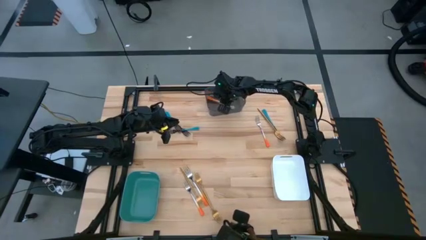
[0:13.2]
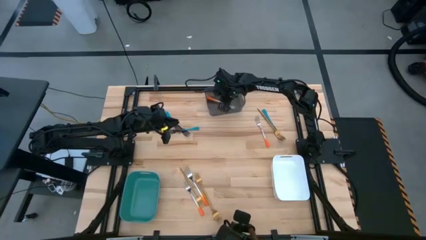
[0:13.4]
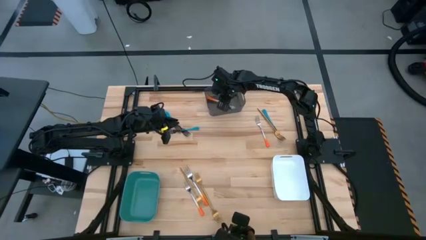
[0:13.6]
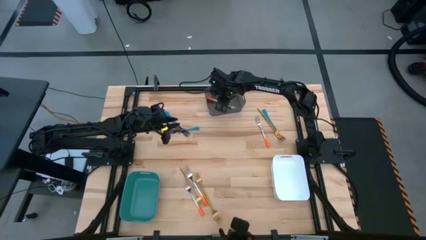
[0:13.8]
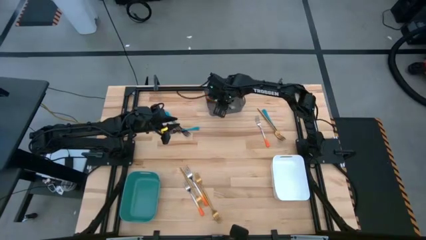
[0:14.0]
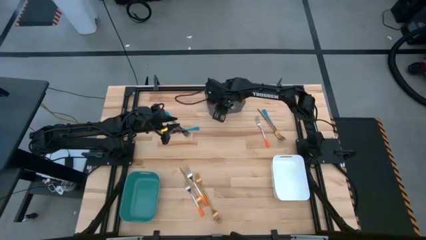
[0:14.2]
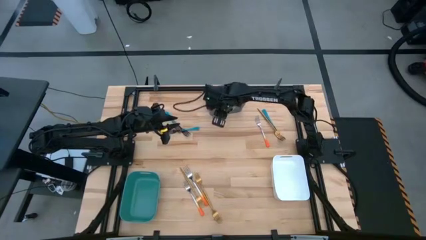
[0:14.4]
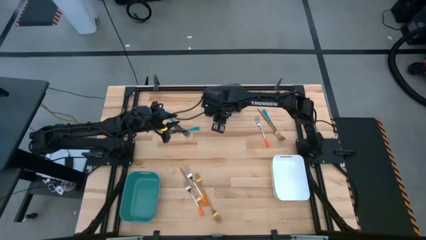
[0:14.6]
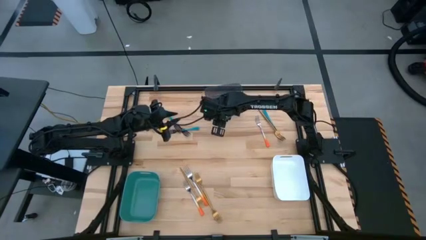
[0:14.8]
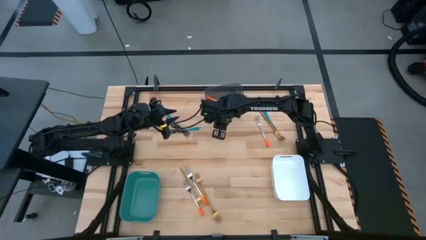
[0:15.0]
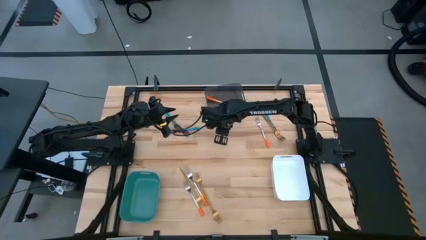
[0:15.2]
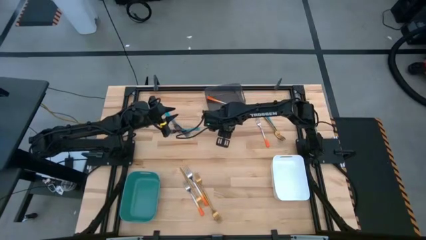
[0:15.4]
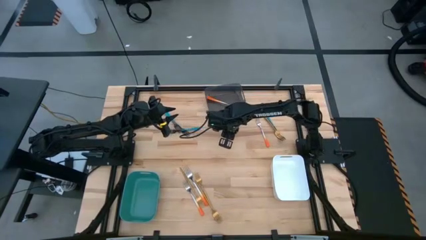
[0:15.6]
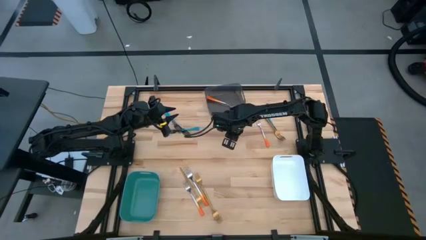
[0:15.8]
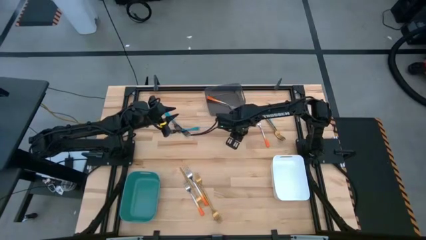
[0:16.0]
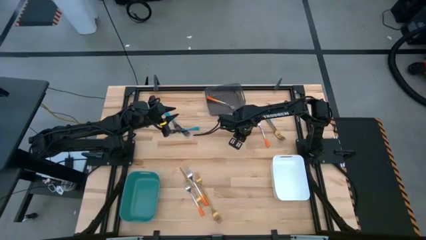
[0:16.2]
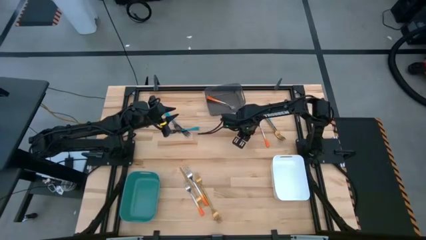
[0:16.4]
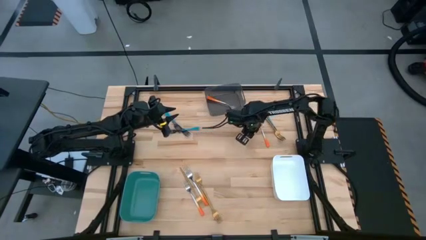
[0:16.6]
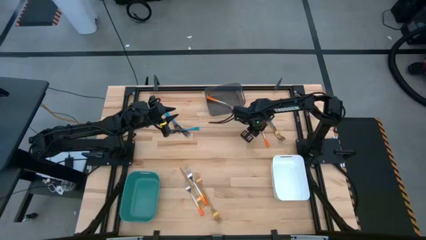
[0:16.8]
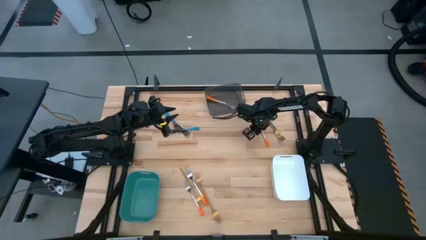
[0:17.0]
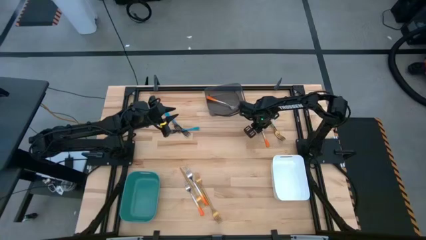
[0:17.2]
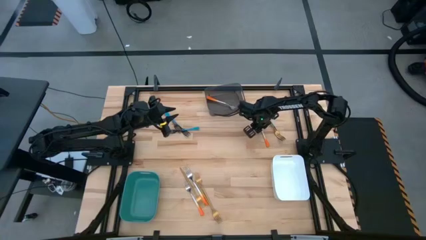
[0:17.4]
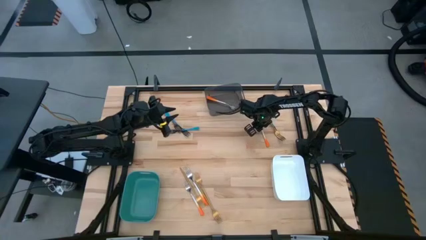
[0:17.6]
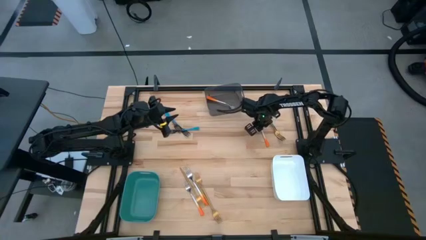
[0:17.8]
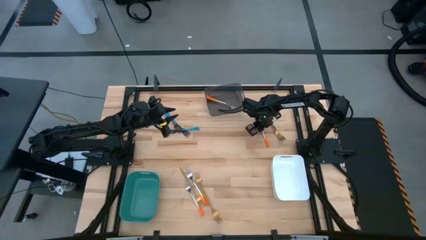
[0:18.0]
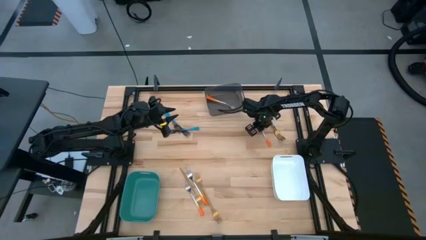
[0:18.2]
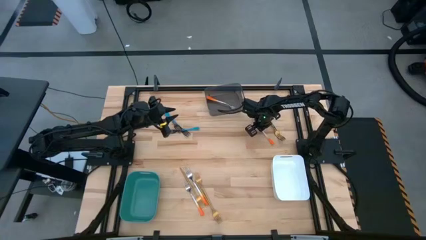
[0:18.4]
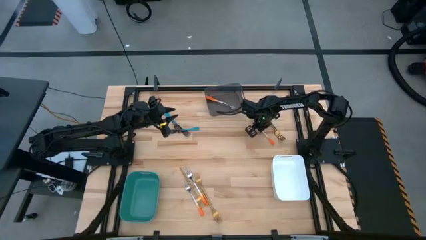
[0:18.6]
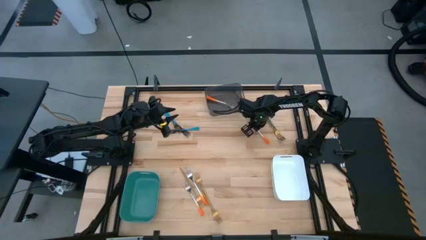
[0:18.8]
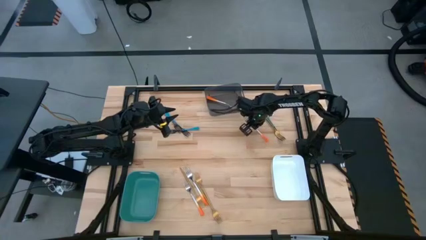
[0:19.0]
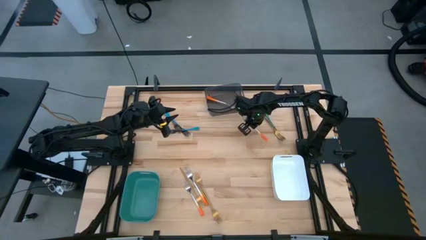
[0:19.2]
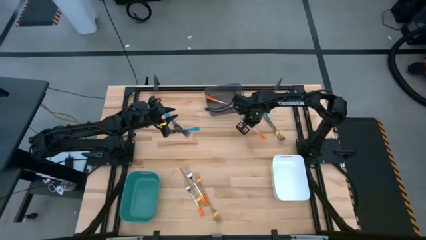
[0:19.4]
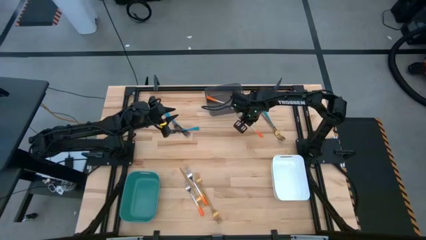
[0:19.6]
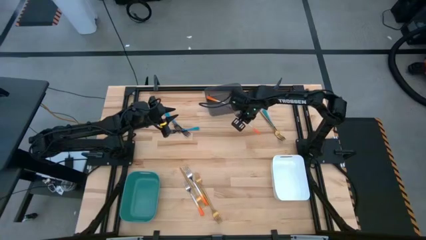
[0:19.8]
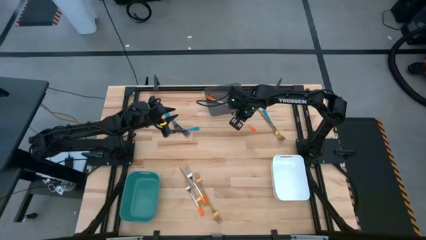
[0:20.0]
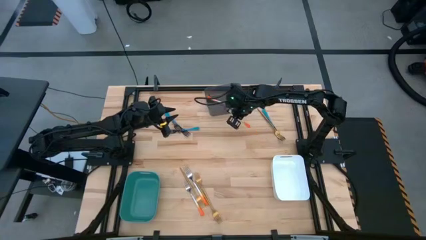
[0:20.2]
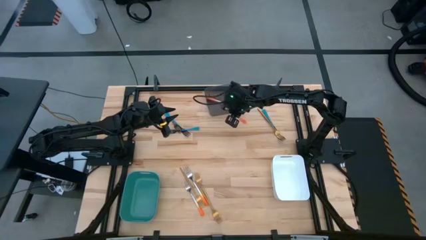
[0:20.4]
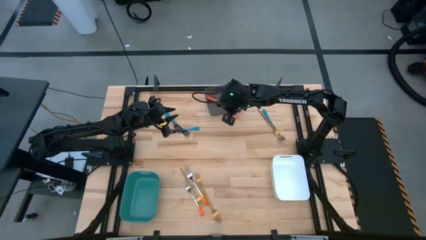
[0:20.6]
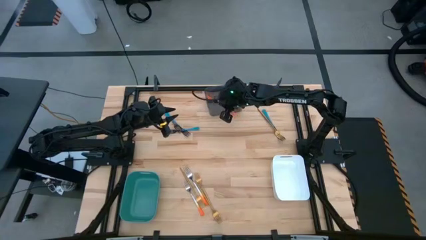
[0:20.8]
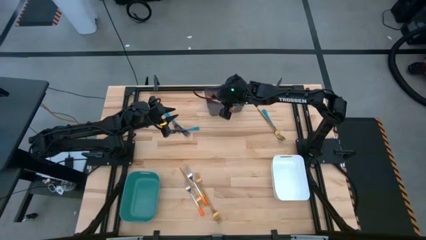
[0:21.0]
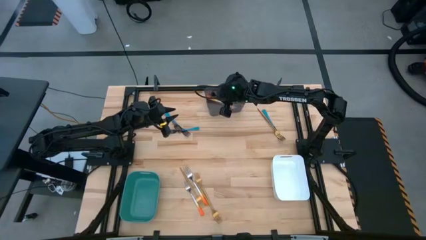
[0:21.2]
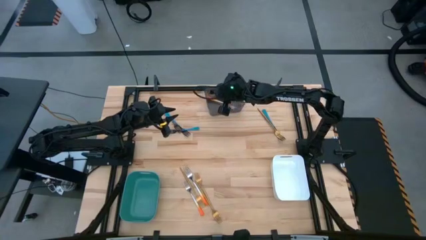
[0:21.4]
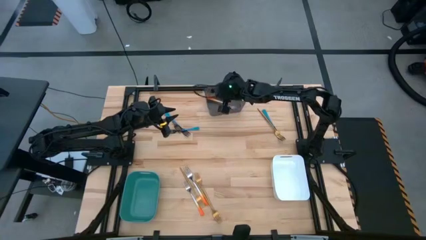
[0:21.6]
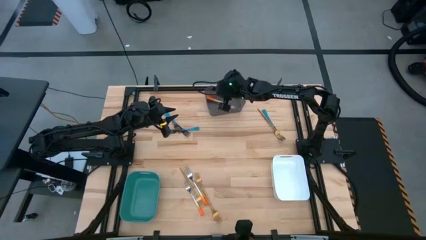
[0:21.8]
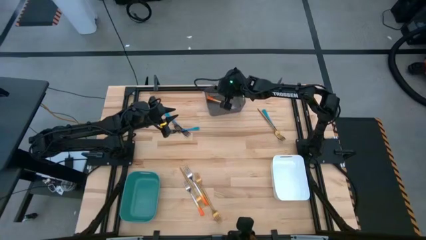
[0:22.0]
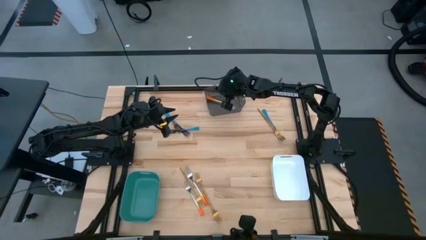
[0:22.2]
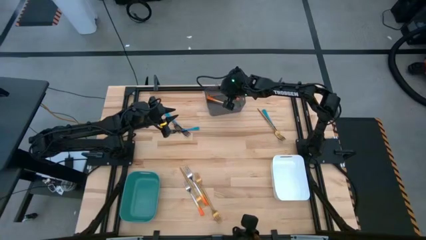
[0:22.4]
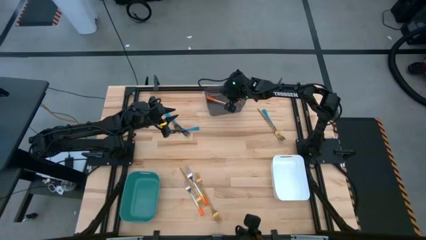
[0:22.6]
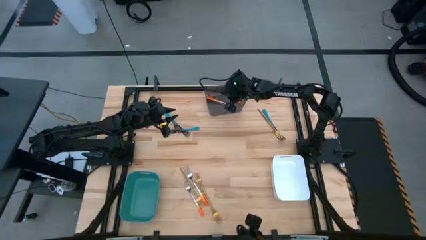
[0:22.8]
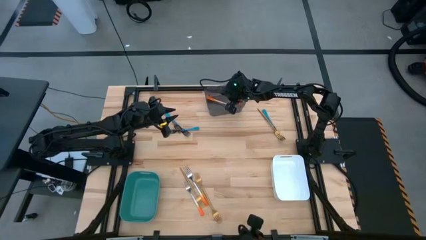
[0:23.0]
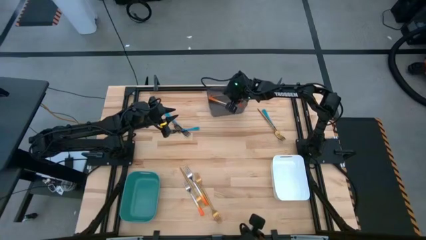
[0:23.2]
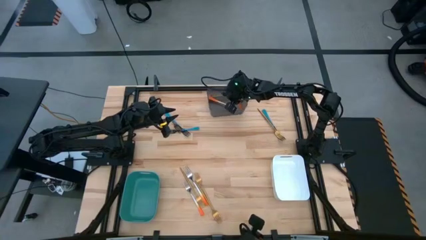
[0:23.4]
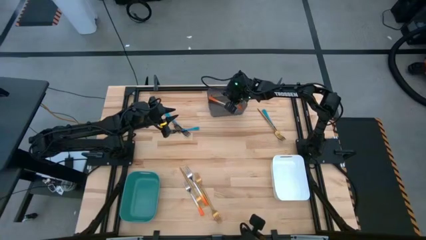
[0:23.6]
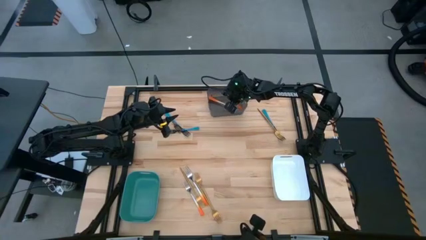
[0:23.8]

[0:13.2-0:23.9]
Task: Sort silverware by color (type)
Put the orange fork into the black bin
